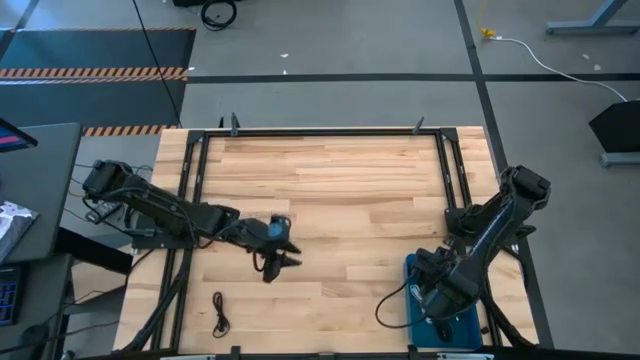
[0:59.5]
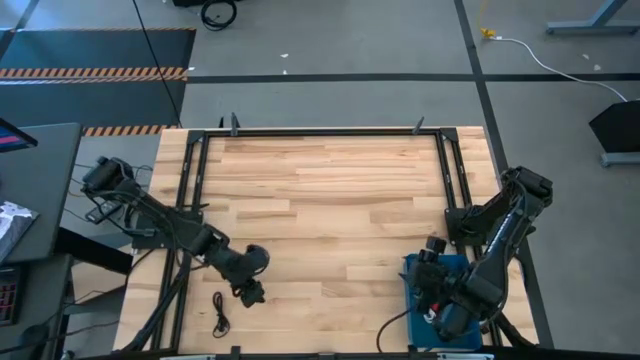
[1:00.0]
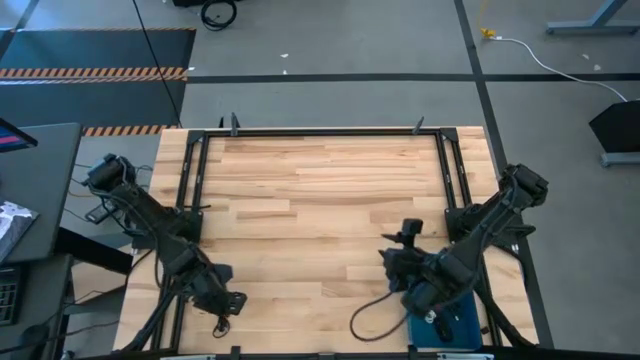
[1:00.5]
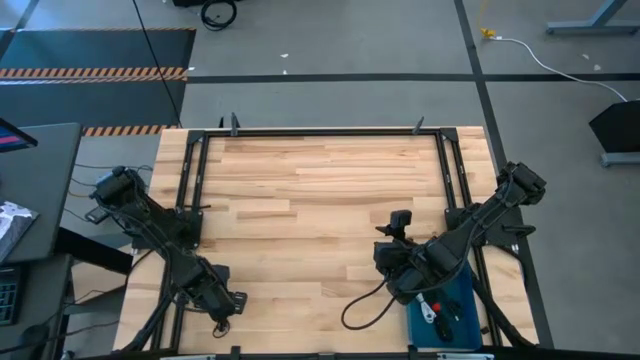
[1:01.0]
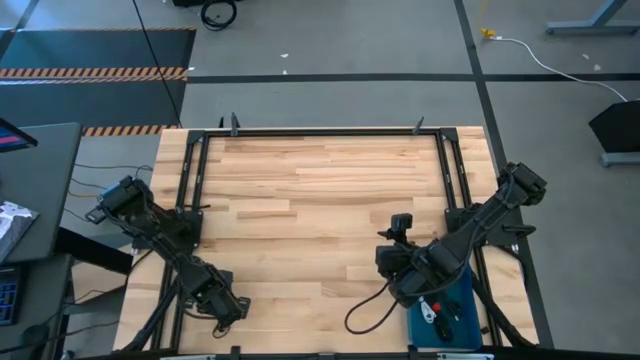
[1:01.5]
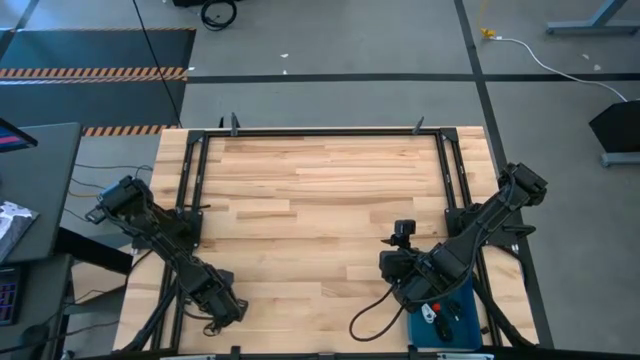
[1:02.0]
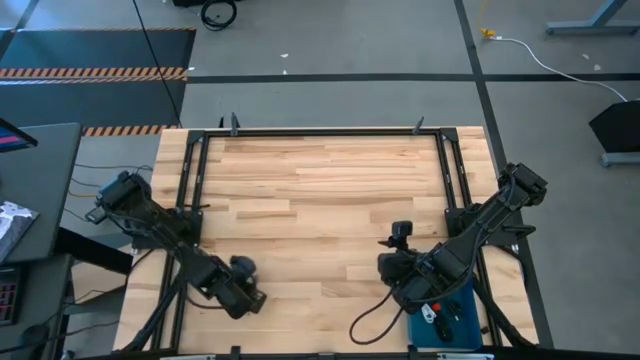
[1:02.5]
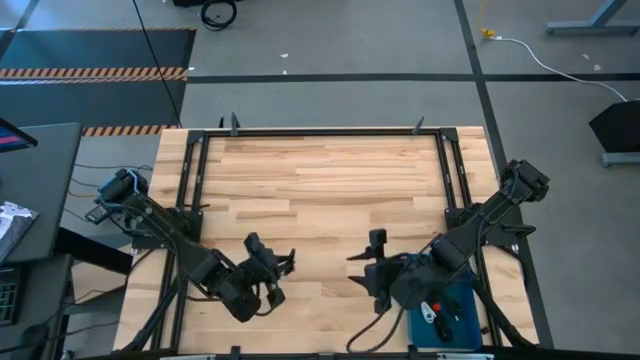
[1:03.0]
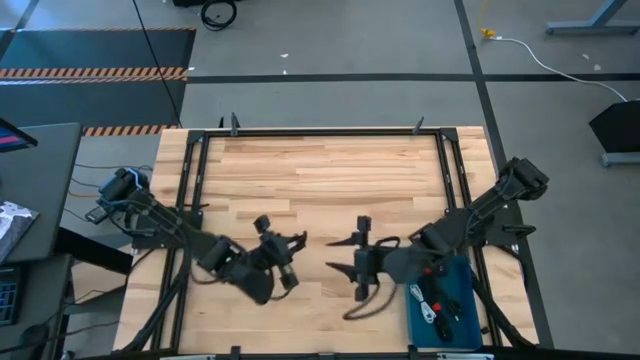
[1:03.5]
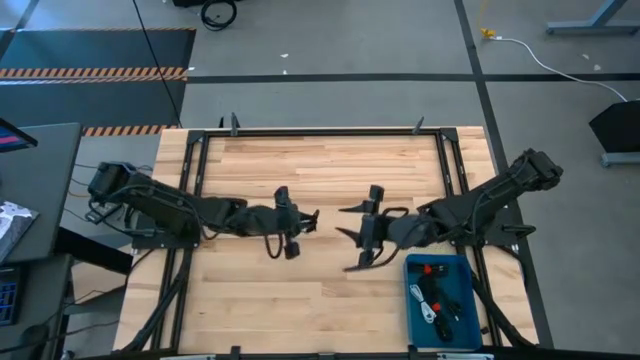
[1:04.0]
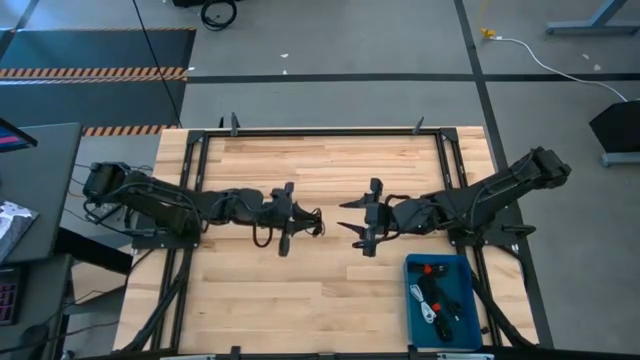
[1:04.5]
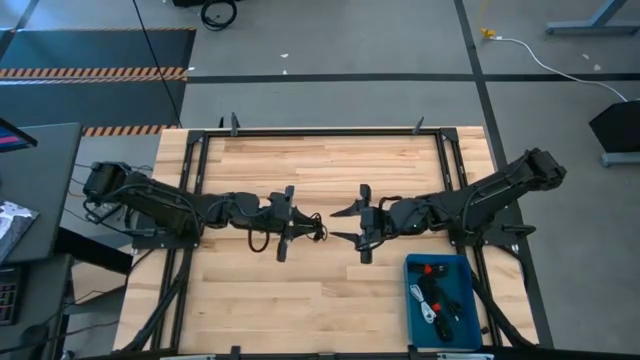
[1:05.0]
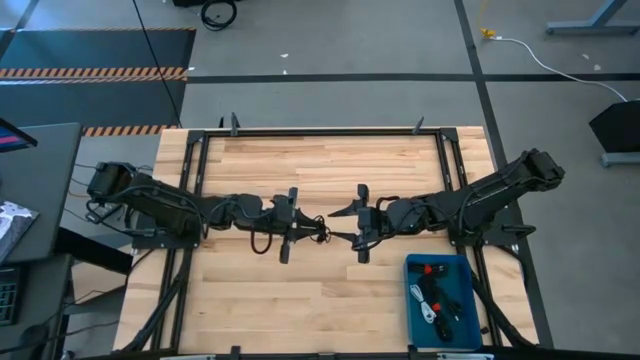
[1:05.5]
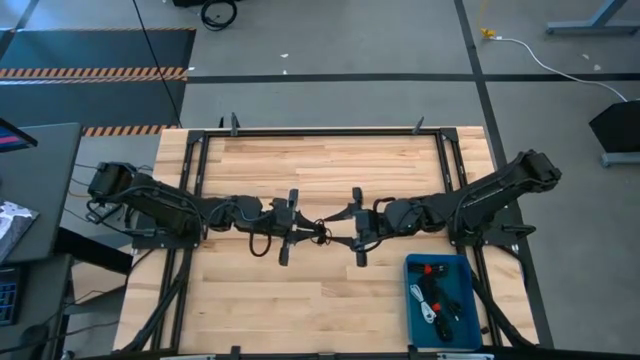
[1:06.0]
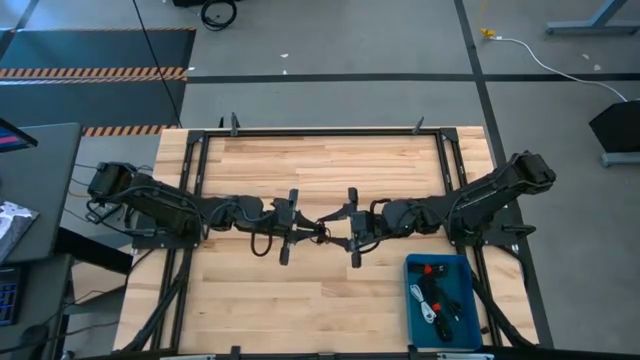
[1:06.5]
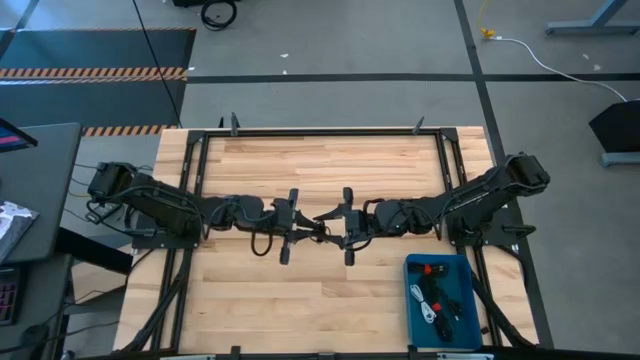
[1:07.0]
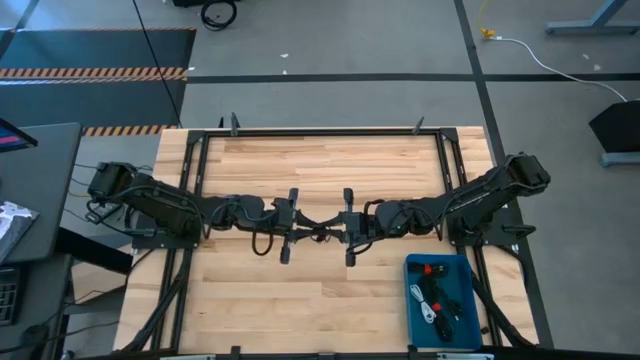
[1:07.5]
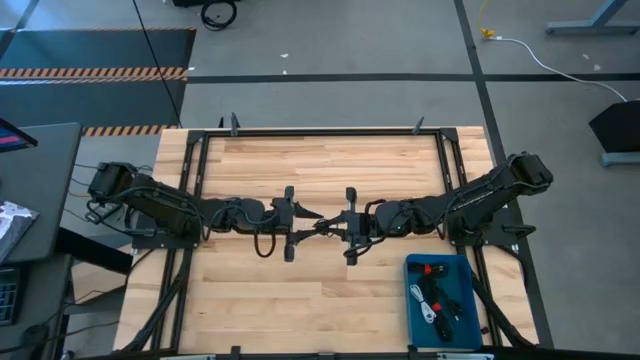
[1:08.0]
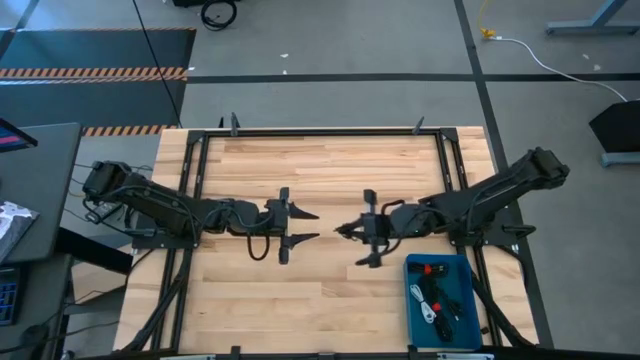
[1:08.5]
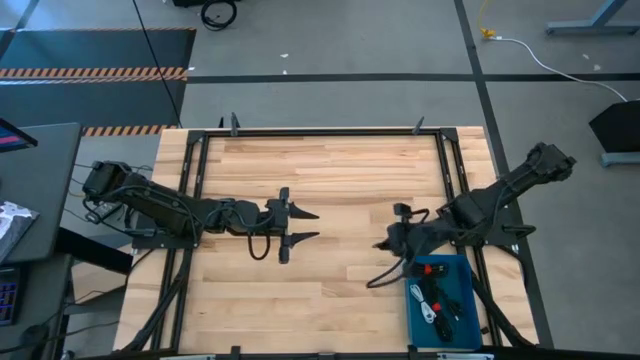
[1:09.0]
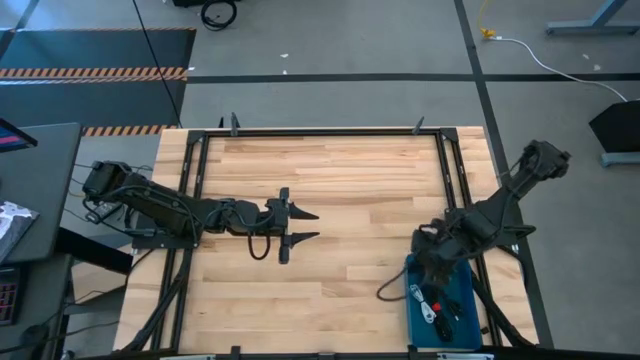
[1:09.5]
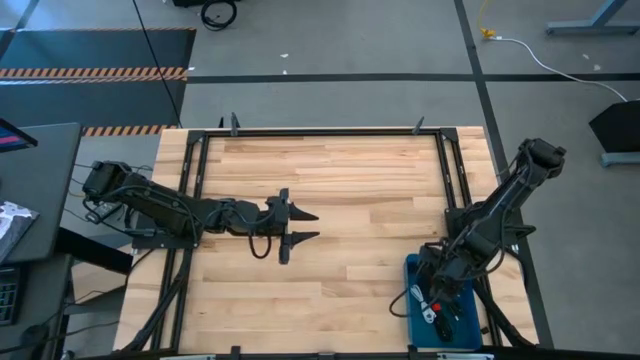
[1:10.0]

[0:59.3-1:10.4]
Task: Pick and place USB-C Cables
Put the black USB cable into the blue bin

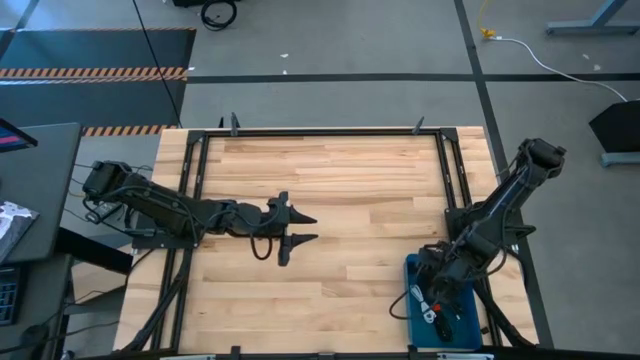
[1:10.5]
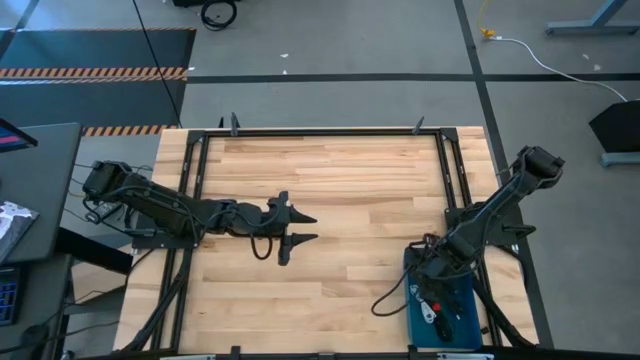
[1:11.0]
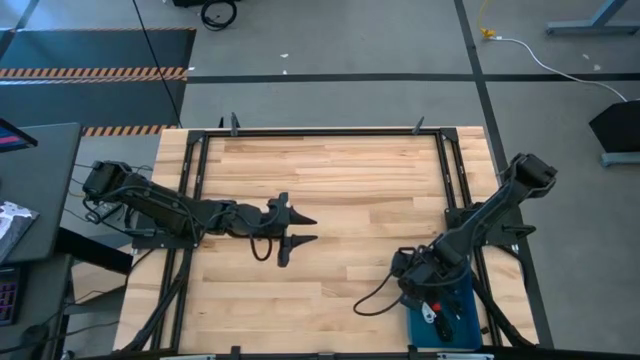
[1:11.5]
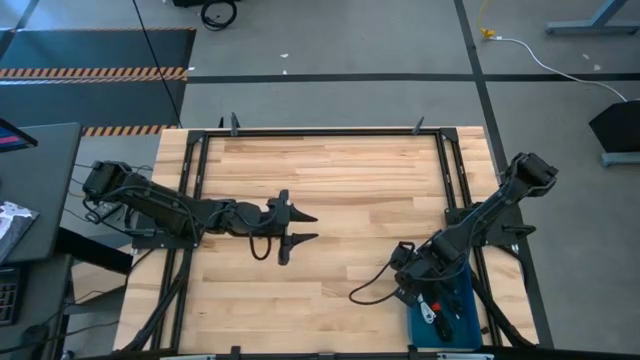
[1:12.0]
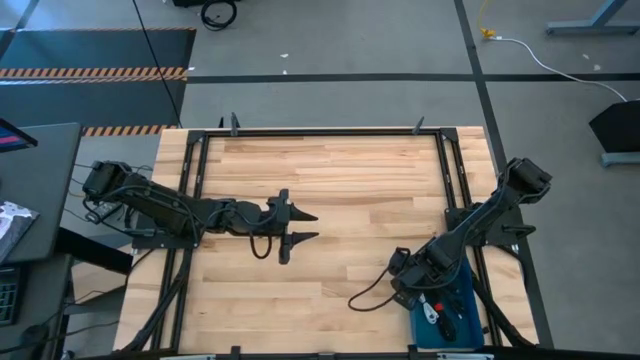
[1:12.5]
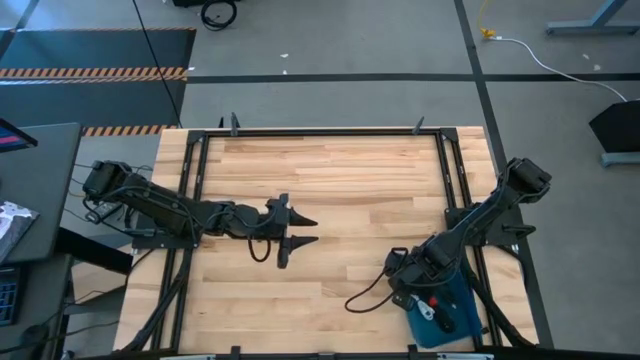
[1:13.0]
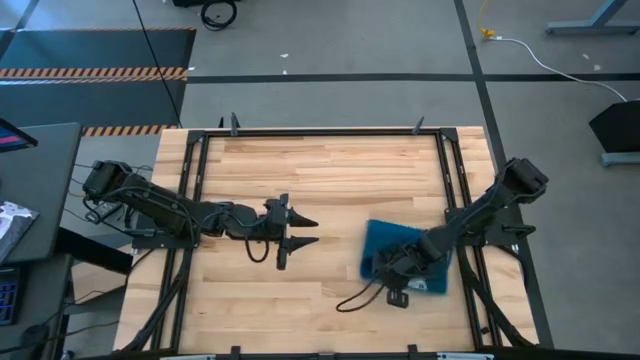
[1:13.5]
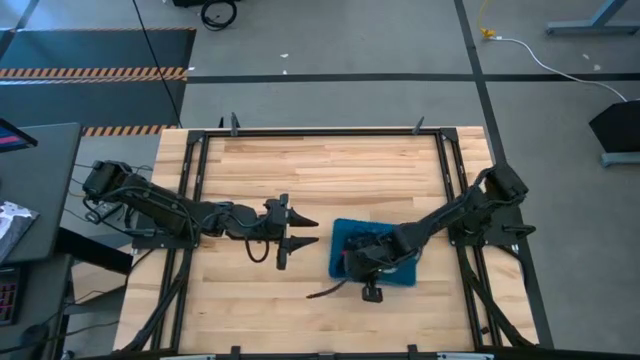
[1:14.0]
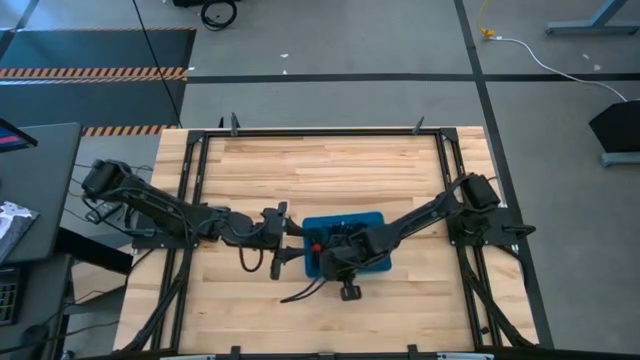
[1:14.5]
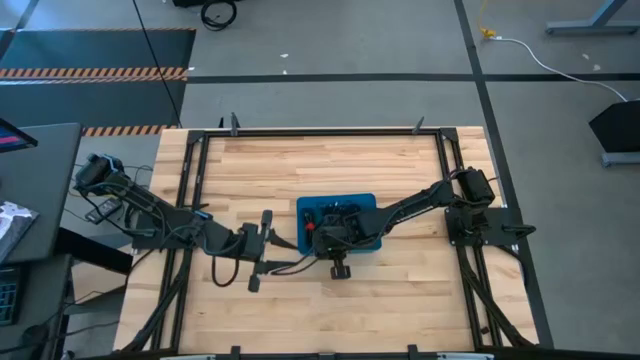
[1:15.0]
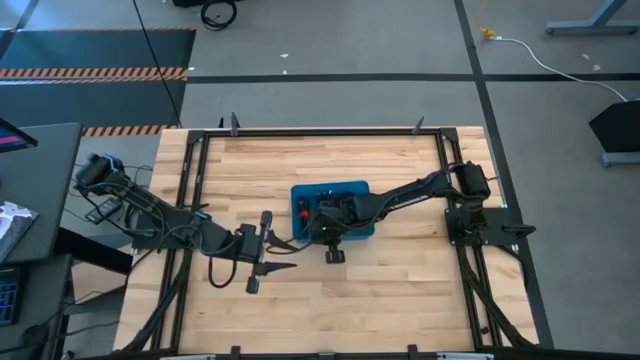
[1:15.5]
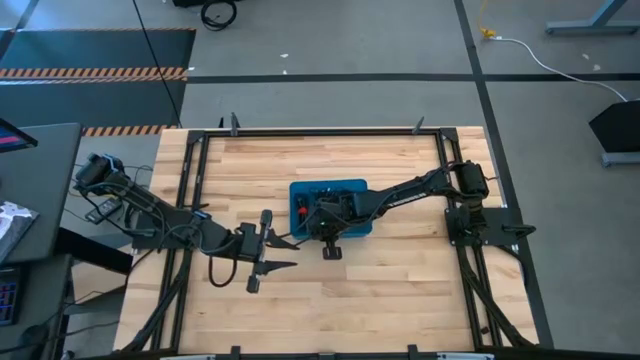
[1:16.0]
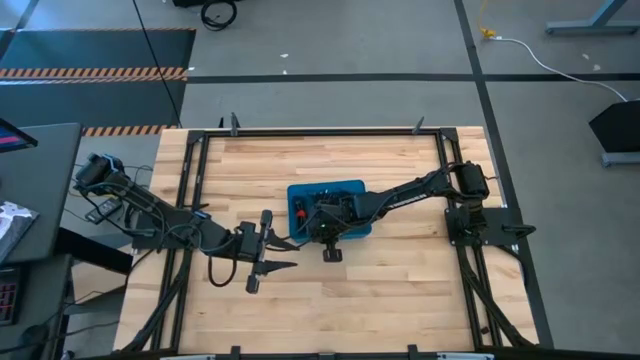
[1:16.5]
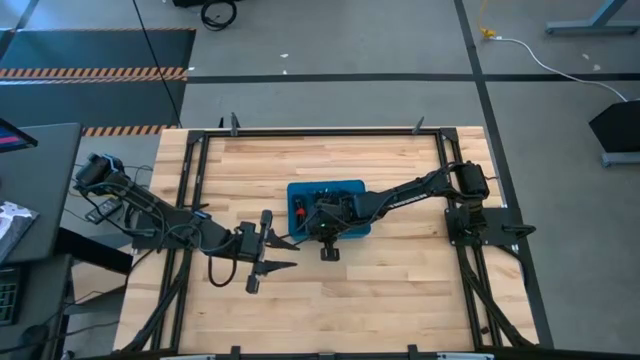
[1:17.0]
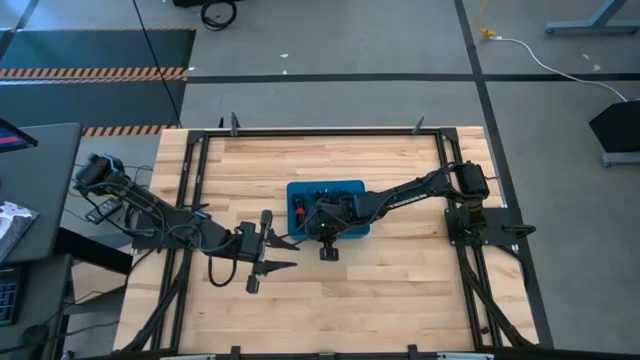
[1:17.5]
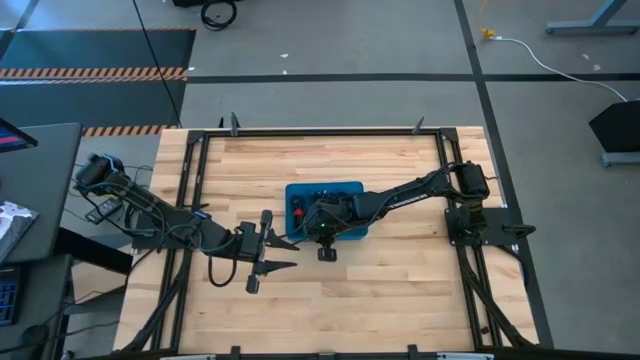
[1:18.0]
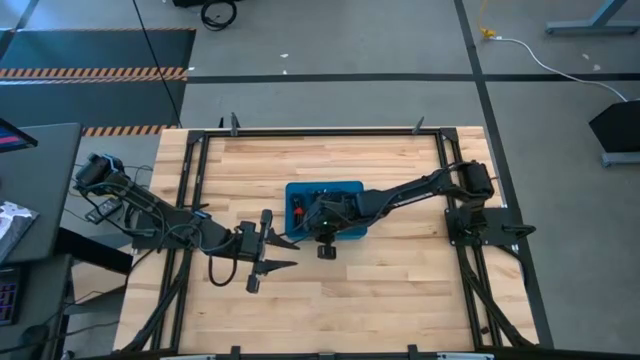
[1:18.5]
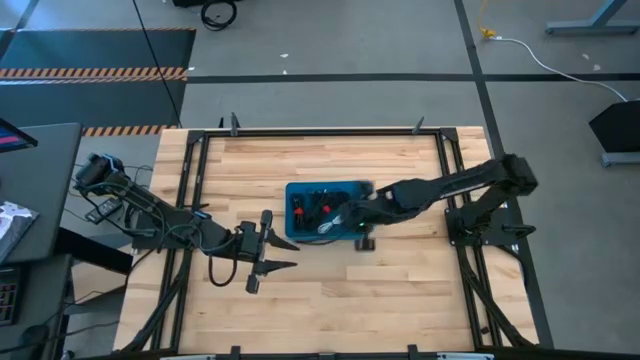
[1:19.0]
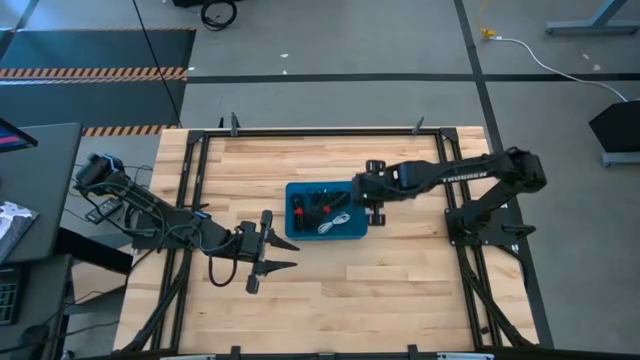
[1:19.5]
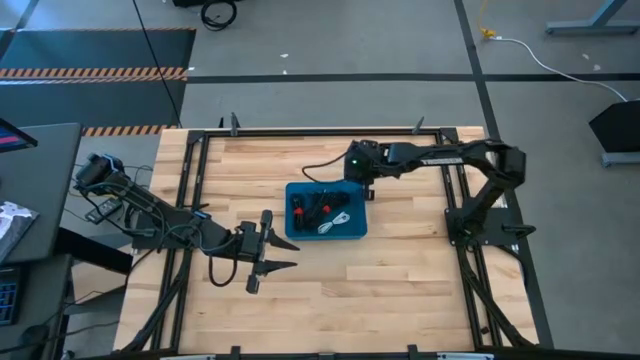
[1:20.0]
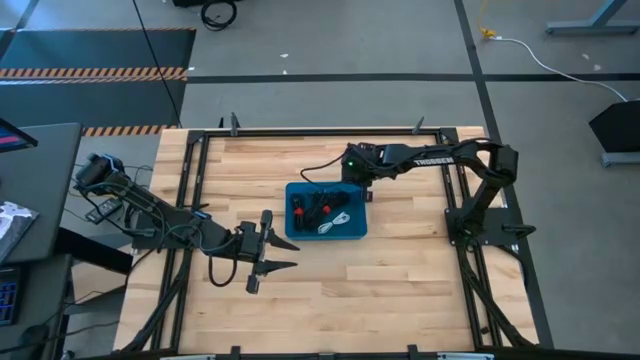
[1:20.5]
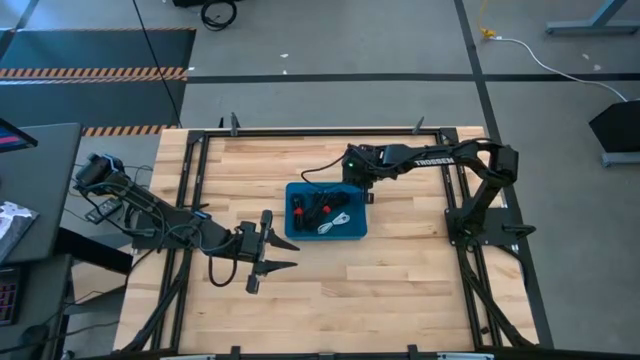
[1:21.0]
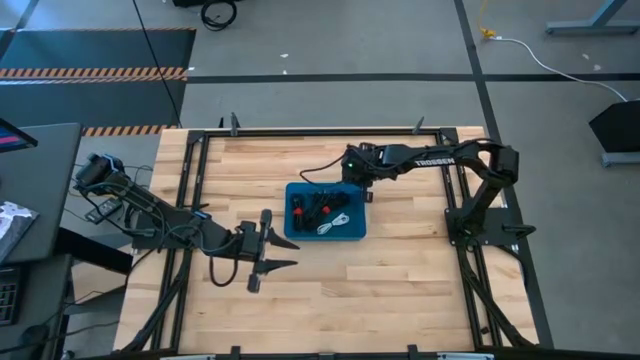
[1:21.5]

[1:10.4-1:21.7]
Move the blue bin from bottom right to the center of the table
